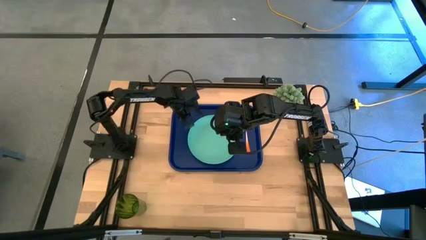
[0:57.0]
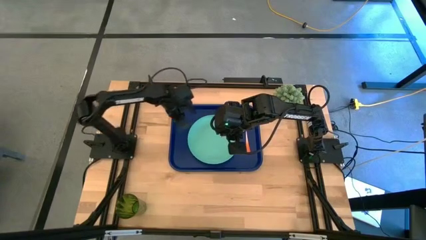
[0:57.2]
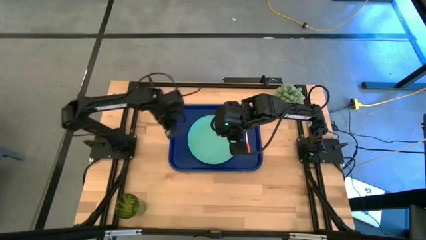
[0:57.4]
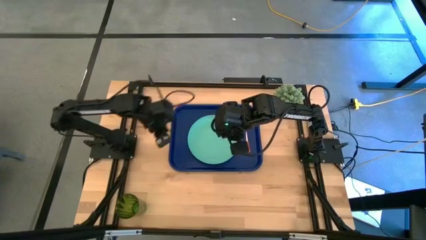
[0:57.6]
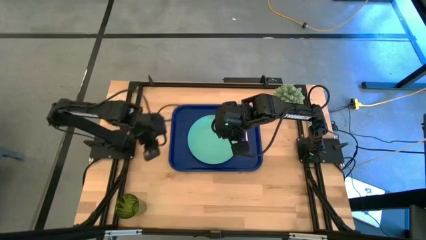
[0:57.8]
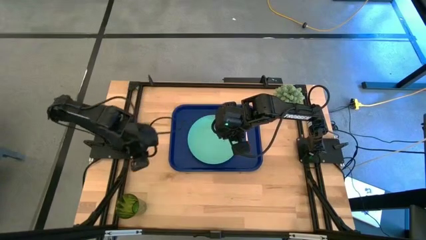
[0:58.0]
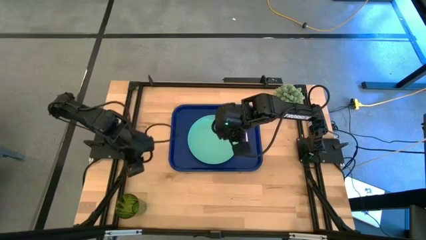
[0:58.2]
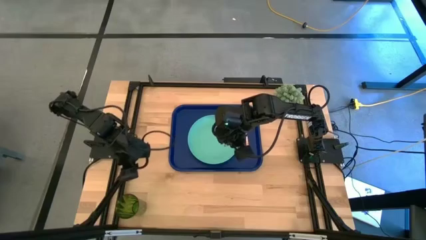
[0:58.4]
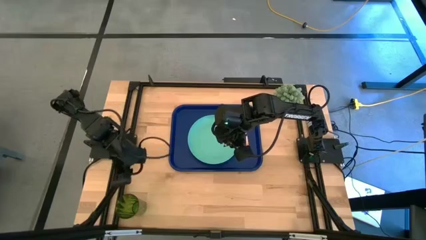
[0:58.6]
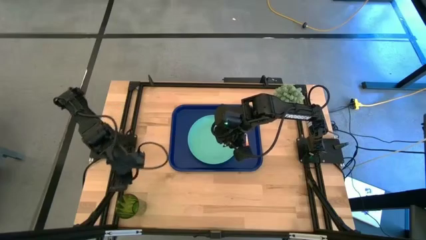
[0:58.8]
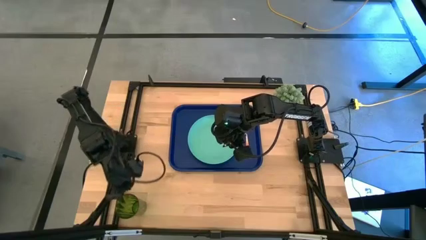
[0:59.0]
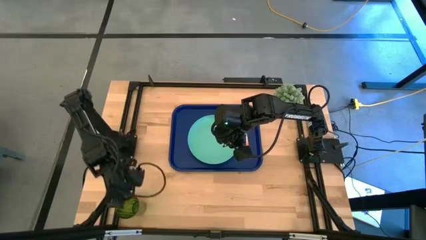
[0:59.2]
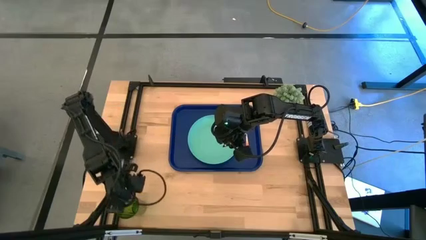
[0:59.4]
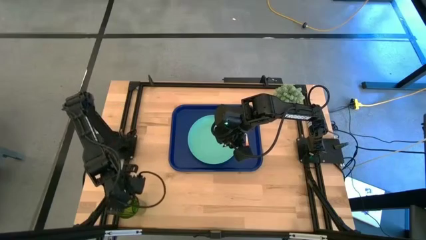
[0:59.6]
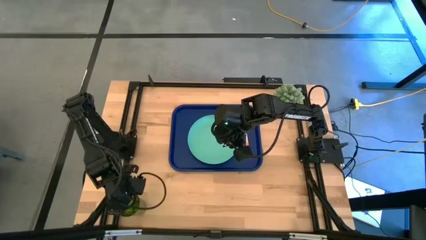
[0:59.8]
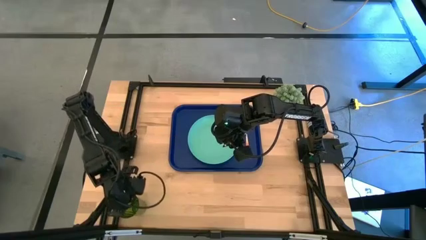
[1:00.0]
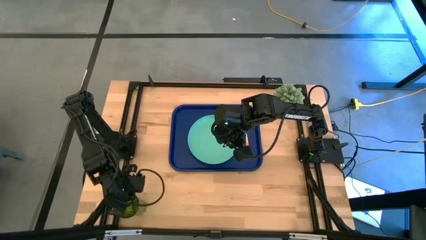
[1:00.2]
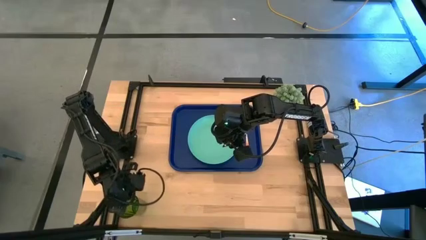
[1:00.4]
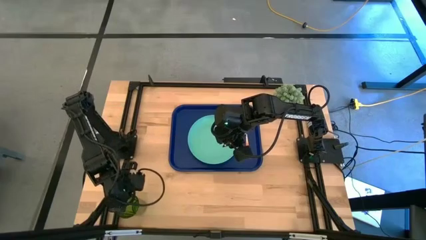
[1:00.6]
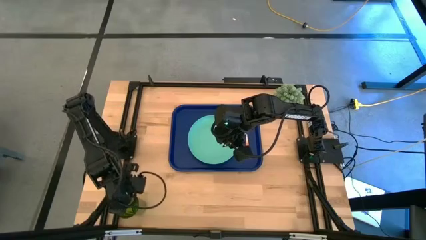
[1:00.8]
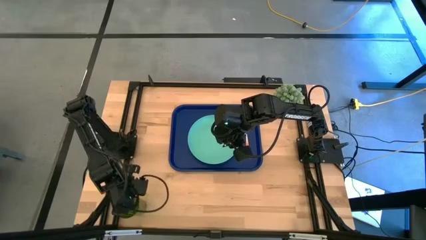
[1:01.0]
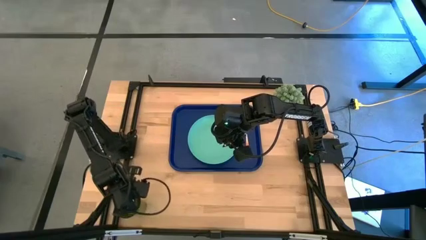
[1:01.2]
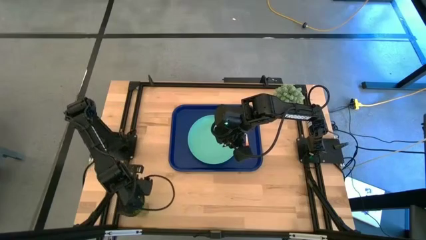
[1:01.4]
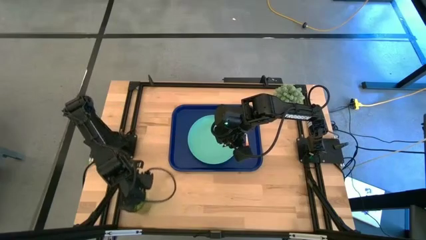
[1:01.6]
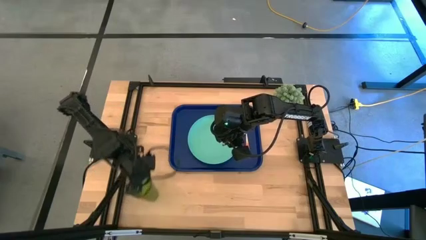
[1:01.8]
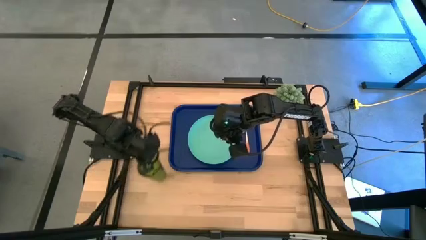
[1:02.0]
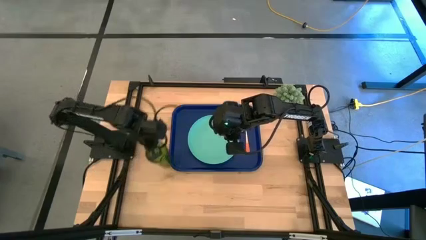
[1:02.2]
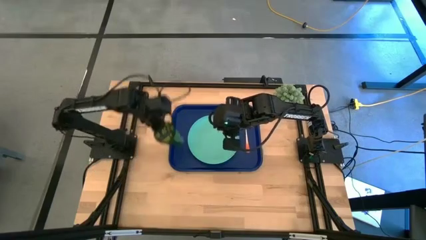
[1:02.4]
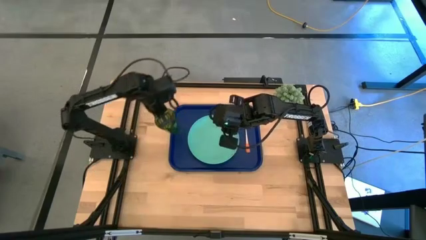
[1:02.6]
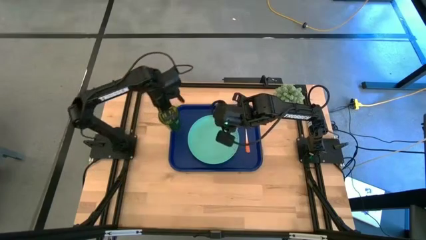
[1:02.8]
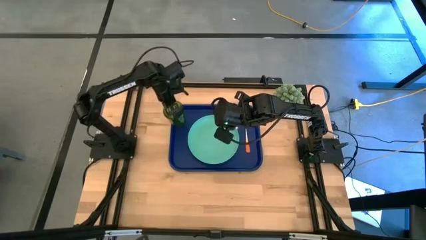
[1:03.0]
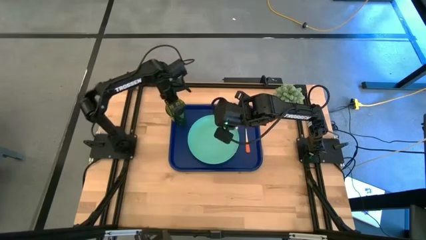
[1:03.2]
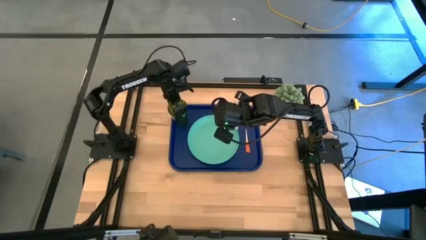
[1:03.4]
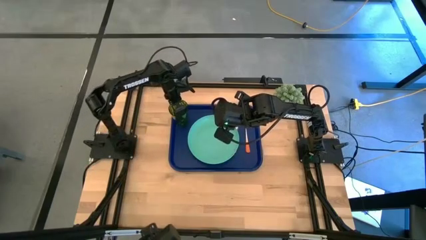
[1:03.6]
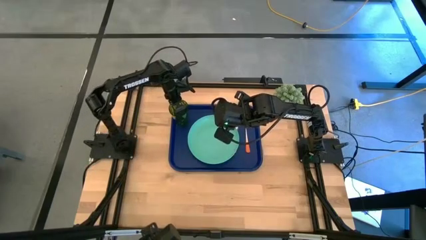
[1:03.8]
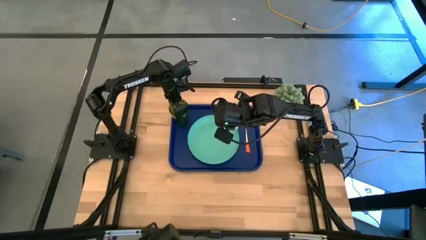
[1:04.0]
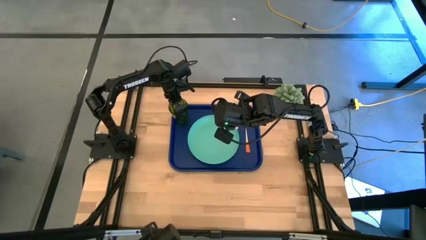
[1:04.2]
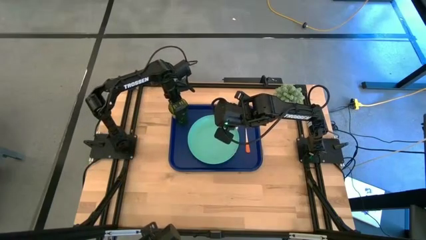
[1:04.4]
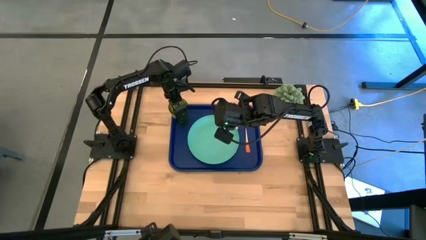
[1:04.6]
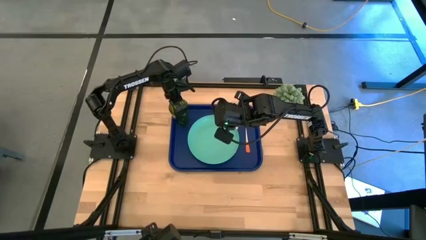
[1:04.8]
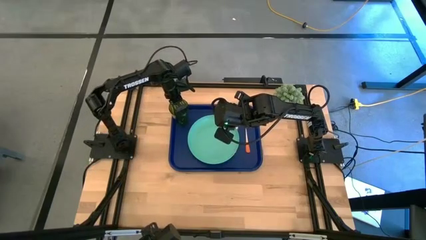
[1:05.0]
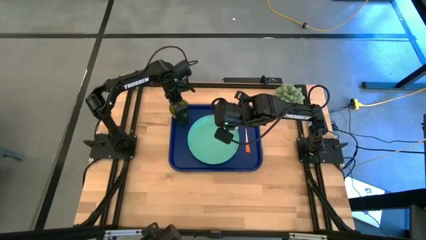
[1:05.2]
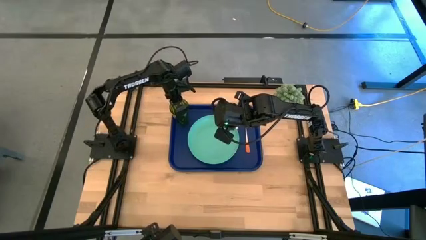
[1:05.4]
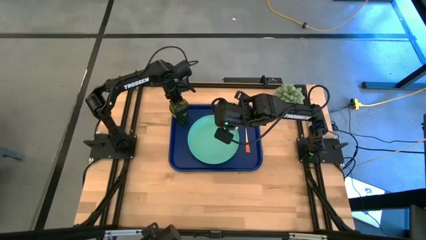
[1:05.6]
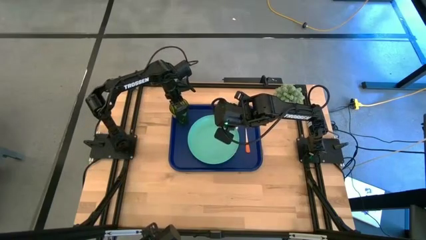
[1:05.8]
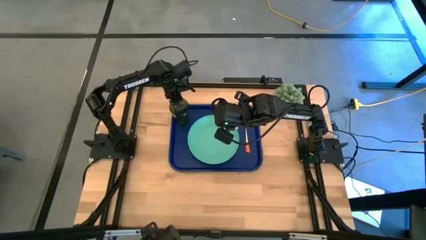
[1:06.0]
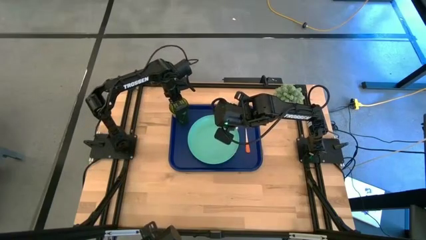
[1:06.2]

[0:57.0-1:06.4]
Task: Pick and place plate/cup/fork/spoon on tray
Put the green glass on the blue serving tray to the top left of the blue plate

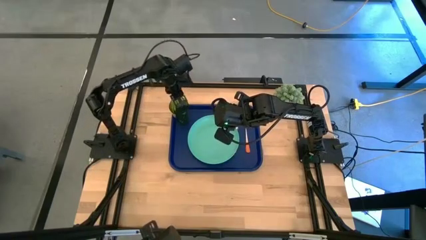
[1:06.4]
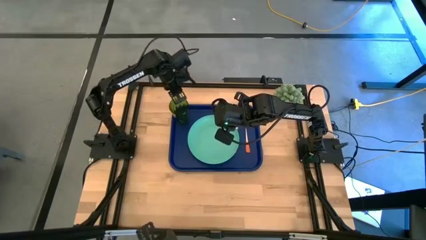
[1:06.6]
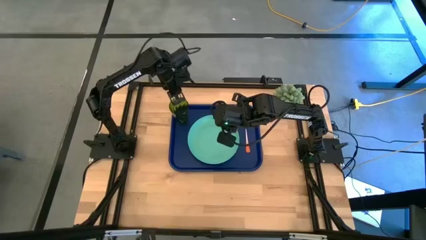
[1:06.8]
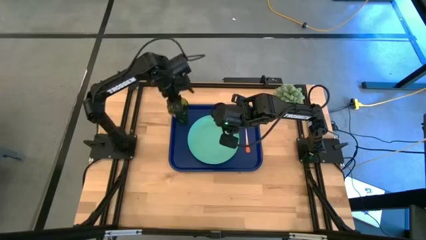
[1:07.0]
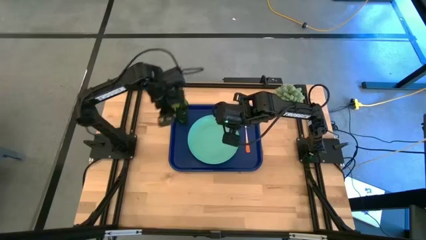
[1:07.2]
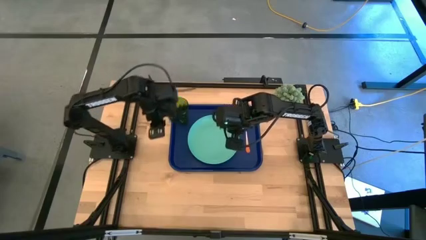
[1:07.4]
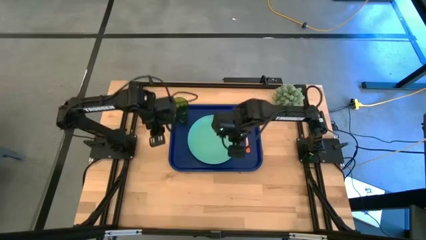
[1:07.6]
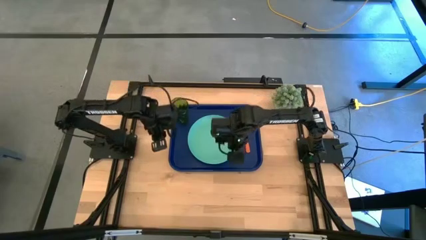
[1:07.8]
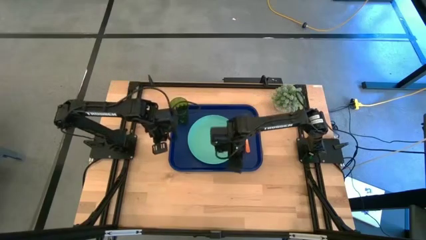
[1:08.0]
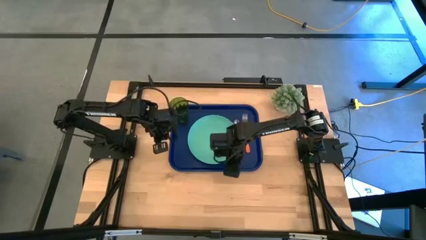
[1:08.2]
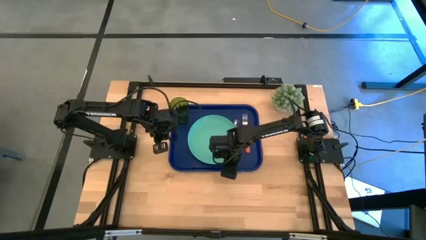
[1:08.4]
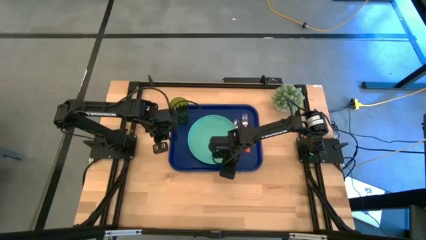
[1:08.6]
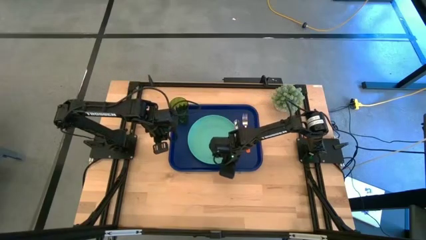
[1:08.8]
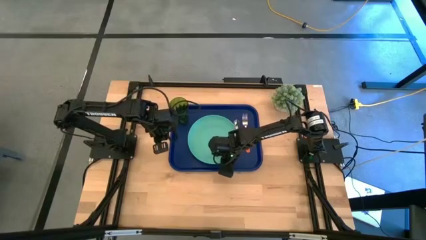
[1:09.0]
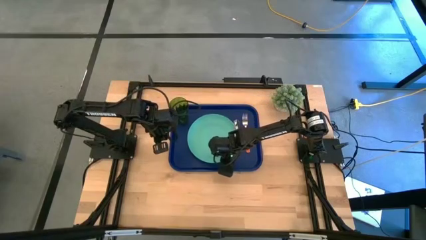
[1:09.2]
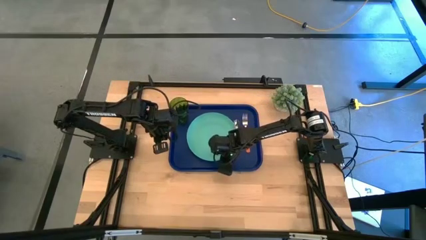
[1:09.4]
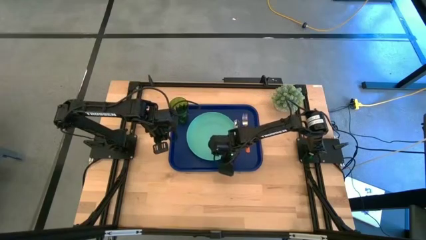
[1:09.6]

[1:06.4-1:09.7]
Adjust the green plate on the blue serving tray

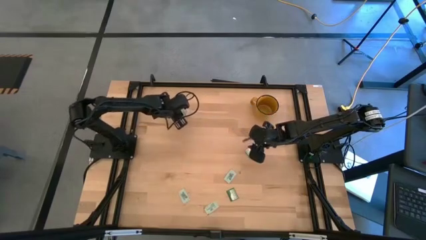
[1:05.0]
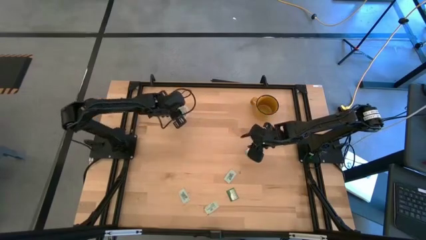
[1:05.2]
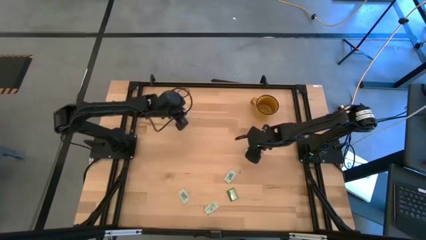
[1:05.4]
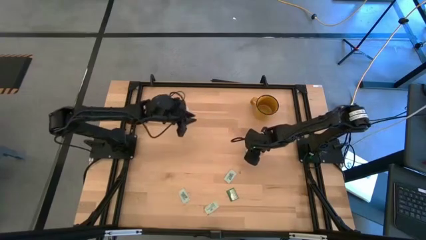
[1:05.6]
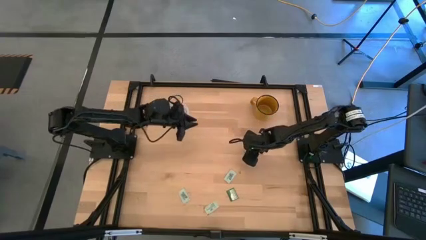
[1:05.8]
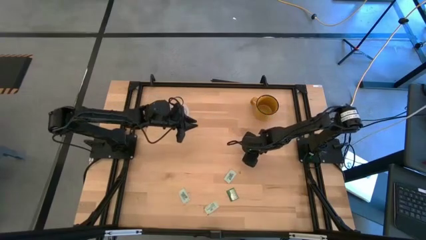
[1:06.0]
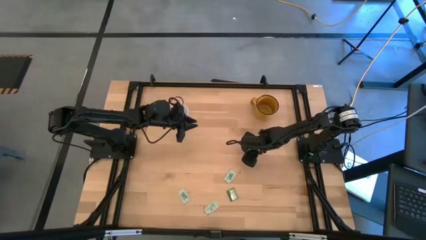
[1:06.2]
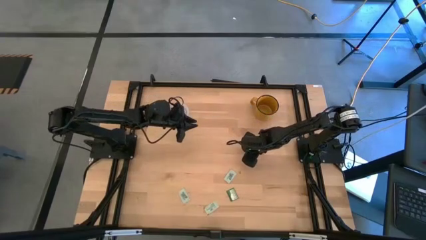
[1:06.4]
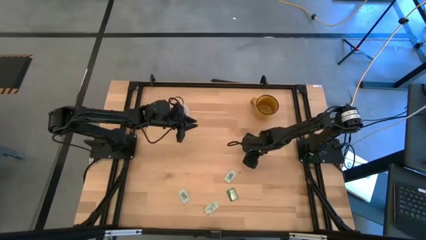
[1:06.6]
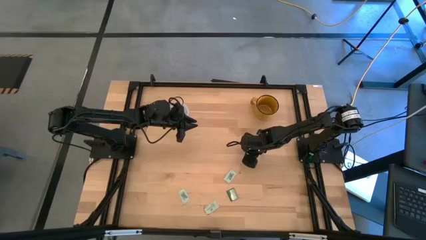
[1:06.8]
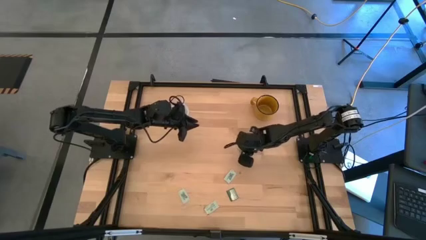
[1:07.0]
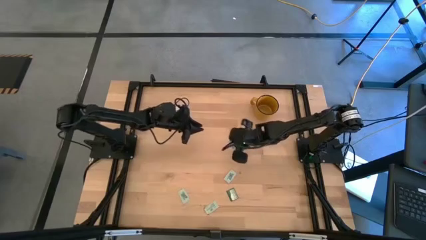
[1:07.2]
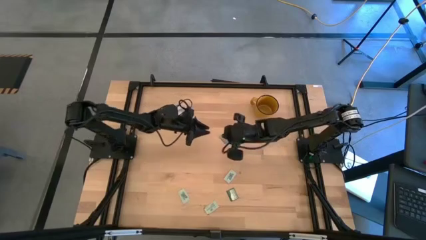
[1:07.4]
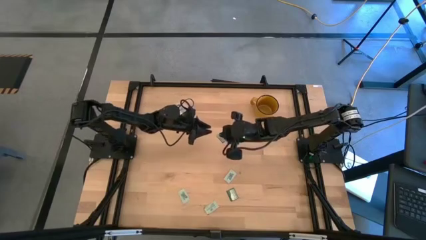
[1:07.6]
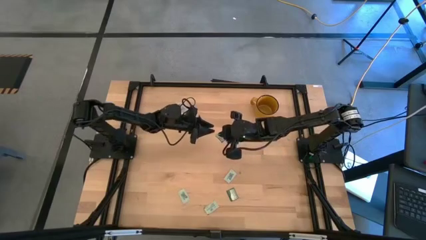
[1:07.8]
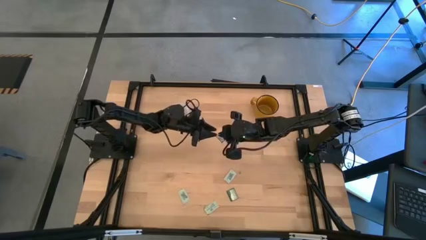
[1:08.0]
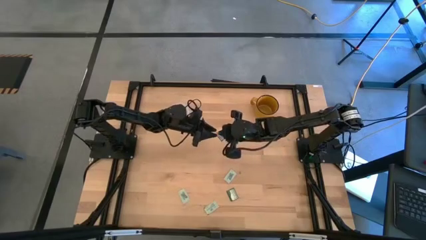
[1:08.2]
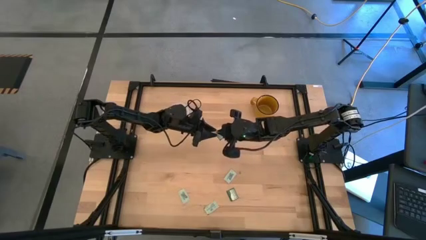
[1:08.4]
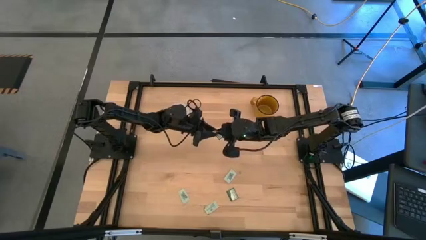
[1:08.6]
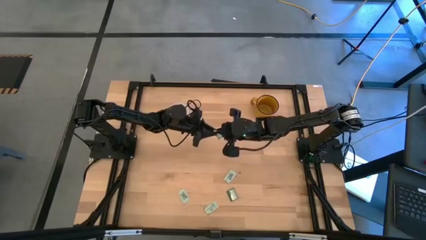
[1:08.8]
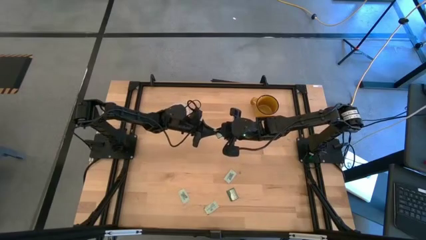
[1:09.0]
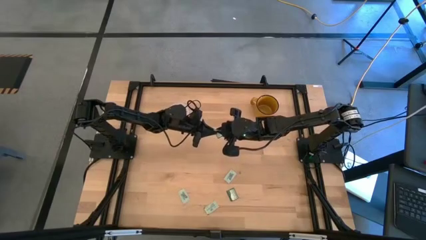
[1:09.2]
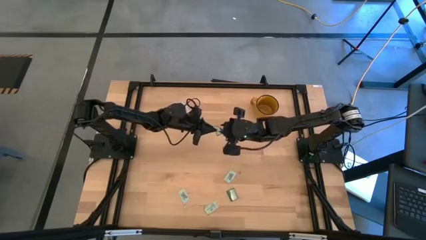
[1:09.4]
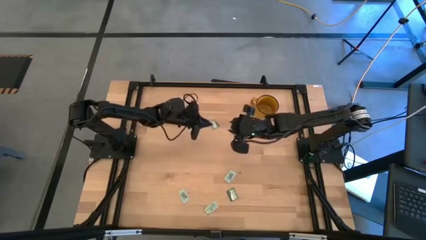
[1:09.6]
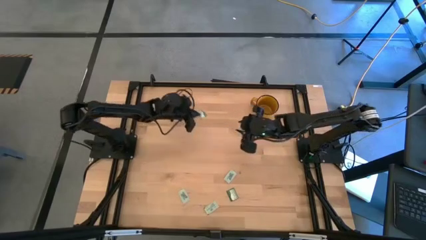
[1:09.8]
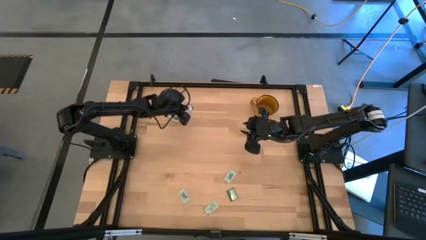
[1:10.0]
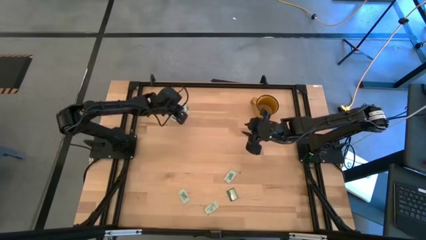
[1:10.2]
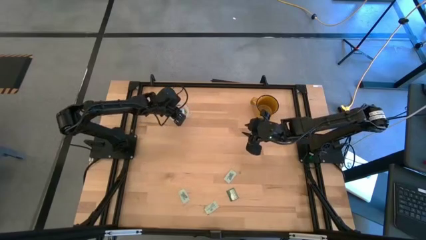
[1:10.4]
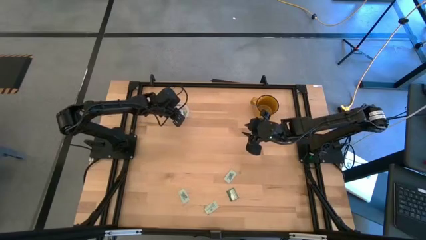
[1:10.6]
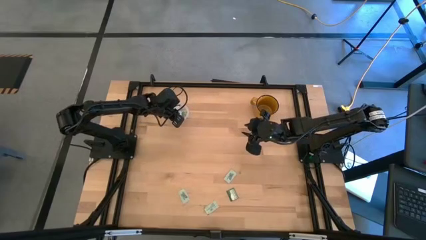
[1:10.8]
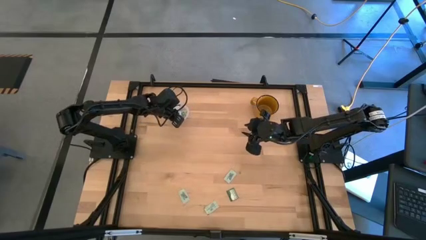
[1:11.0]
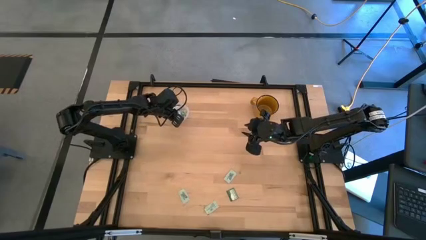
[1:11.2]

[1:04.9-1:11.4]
Task: Pick and place Stevia / Truvia into bins
Put the truvia packet into the transparent container
